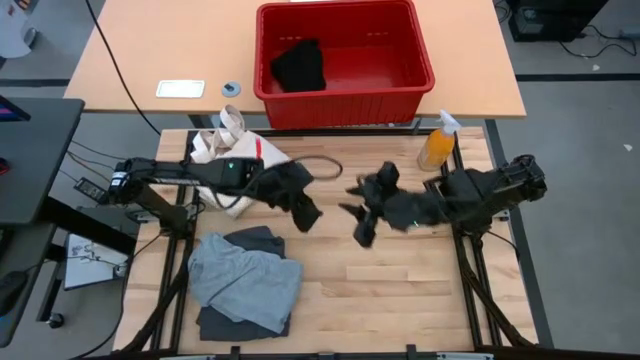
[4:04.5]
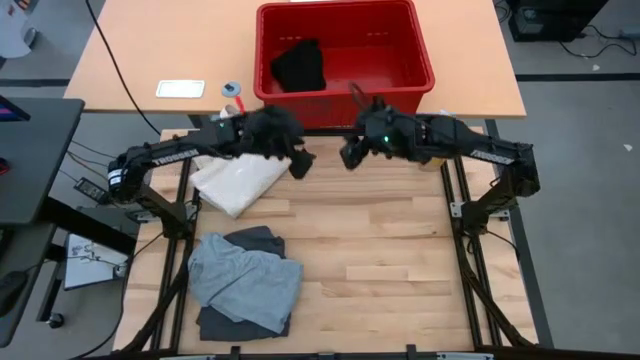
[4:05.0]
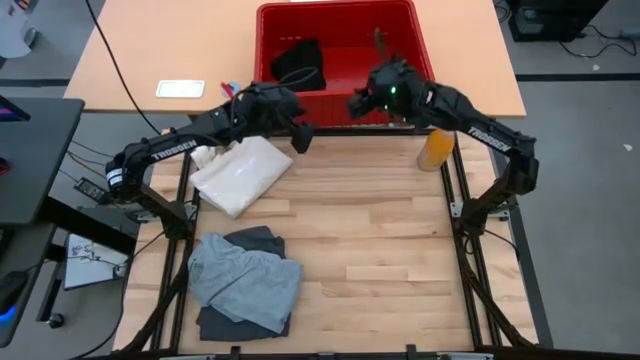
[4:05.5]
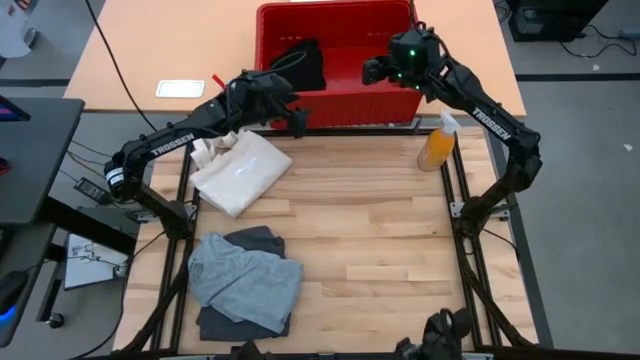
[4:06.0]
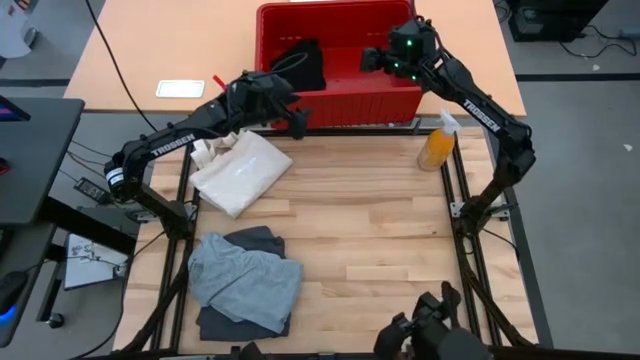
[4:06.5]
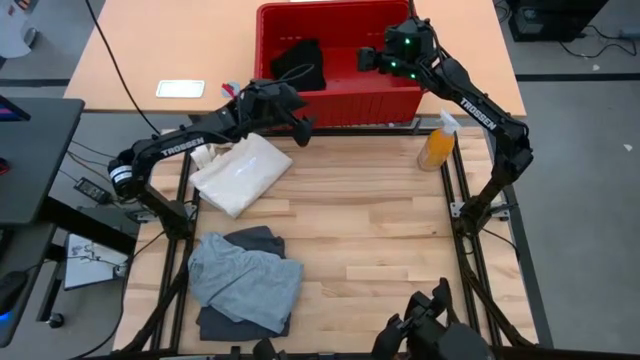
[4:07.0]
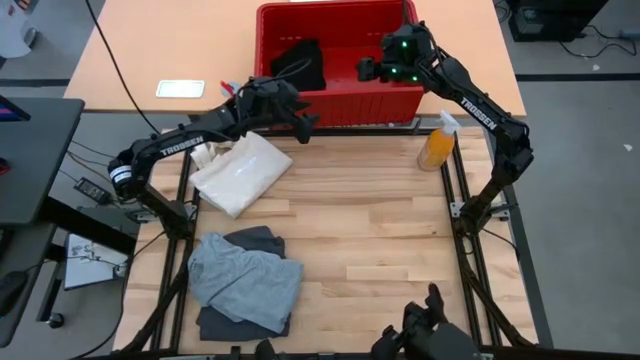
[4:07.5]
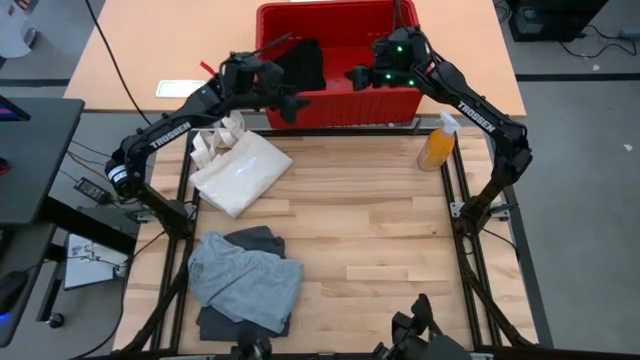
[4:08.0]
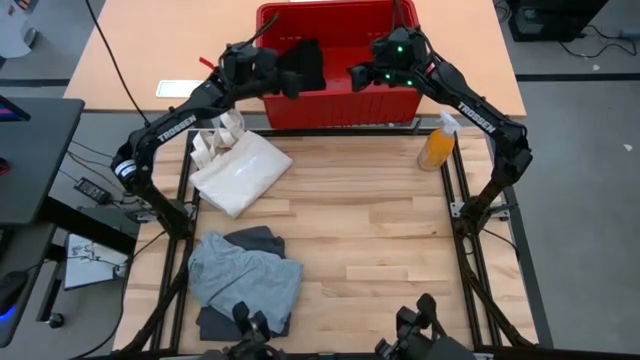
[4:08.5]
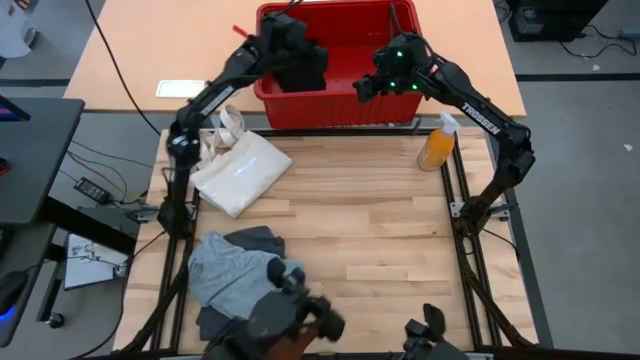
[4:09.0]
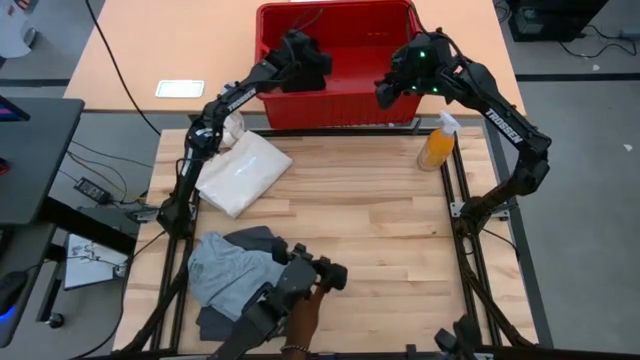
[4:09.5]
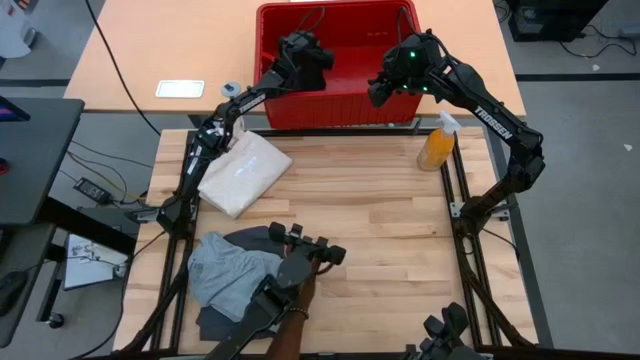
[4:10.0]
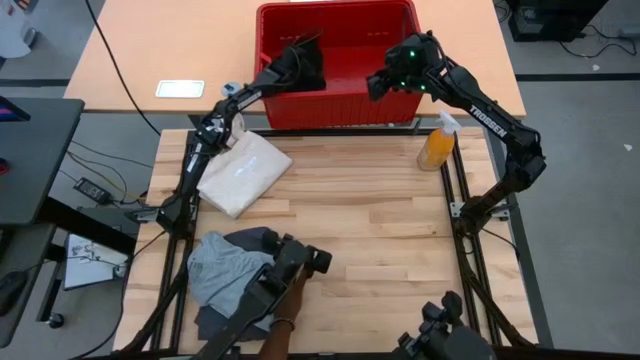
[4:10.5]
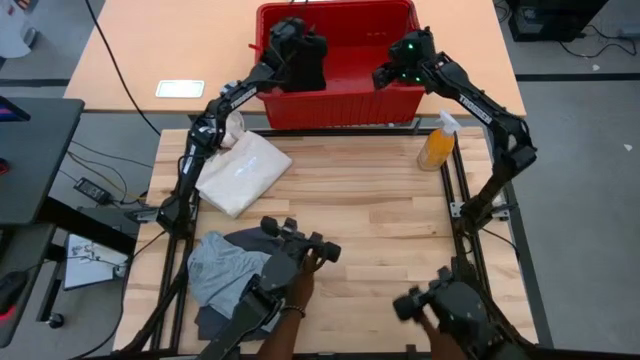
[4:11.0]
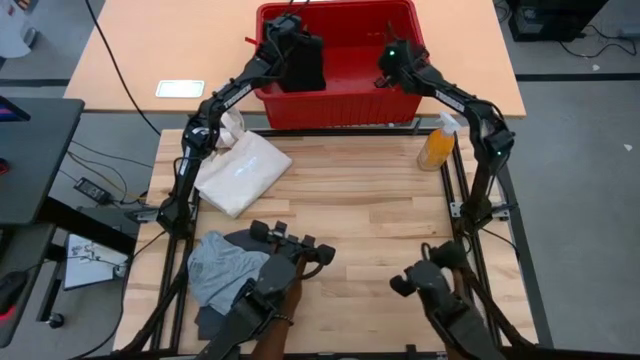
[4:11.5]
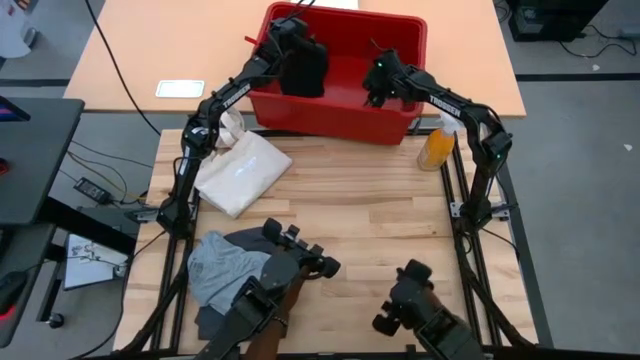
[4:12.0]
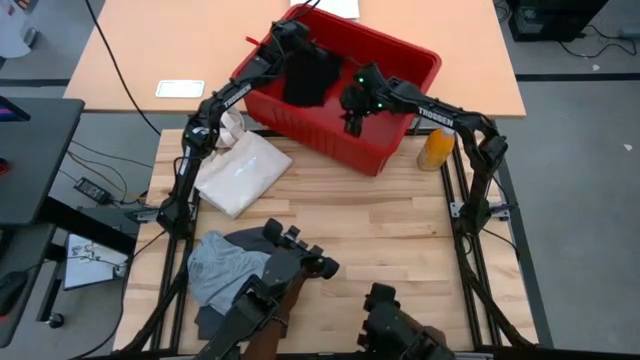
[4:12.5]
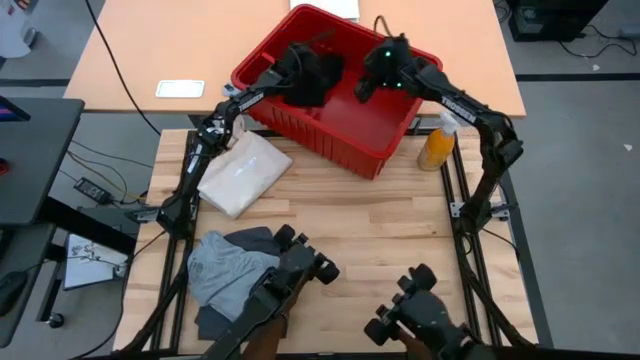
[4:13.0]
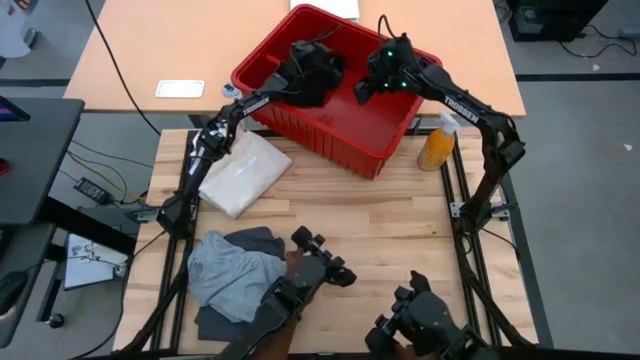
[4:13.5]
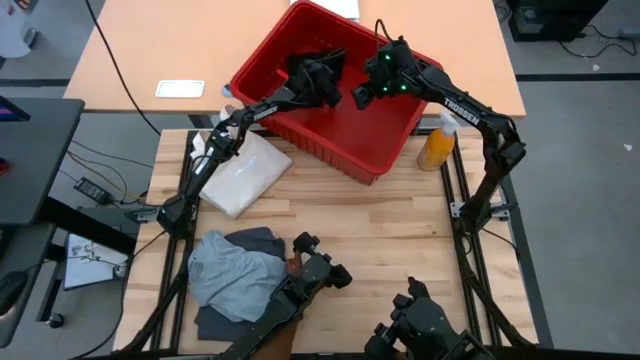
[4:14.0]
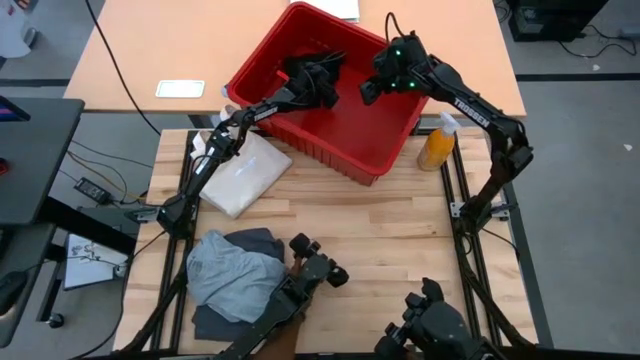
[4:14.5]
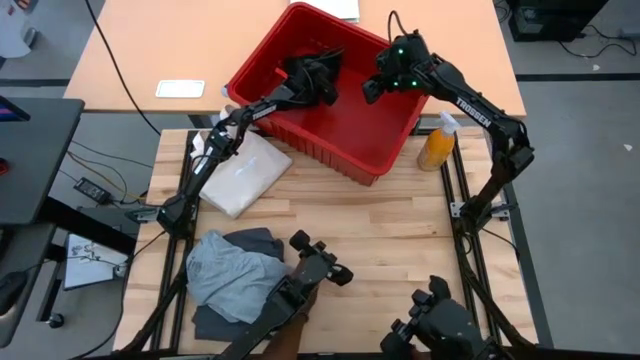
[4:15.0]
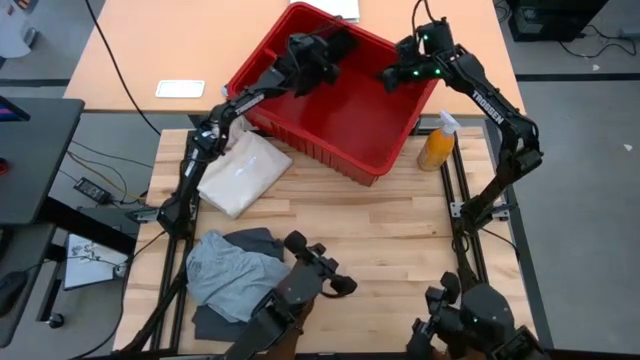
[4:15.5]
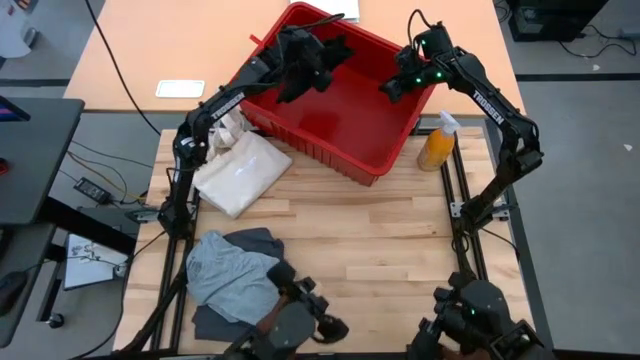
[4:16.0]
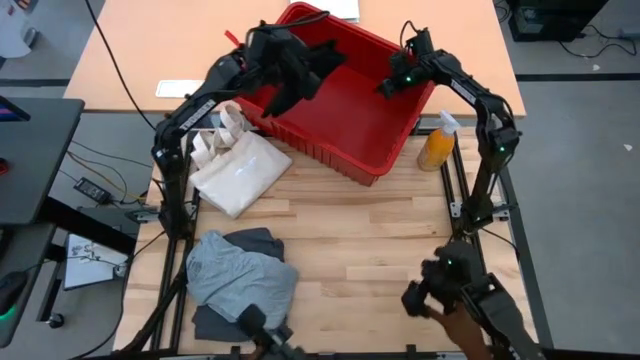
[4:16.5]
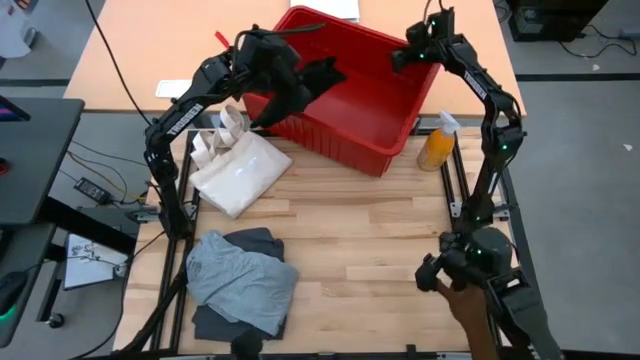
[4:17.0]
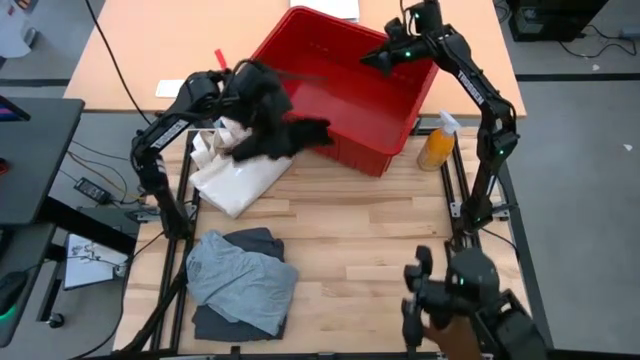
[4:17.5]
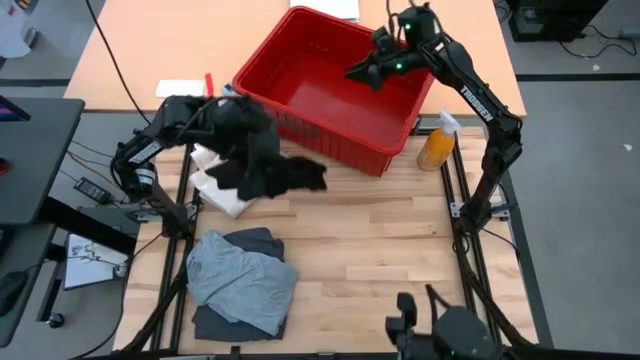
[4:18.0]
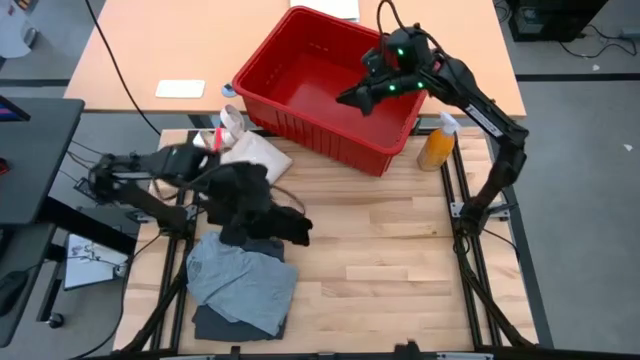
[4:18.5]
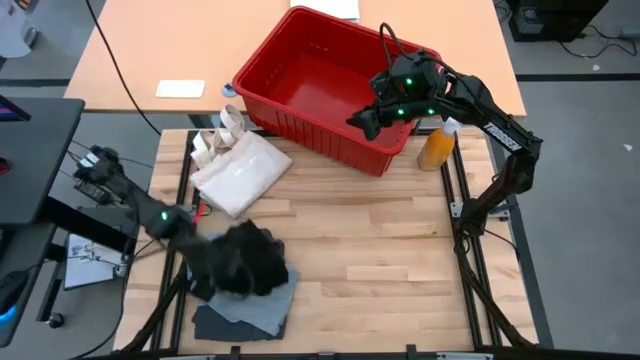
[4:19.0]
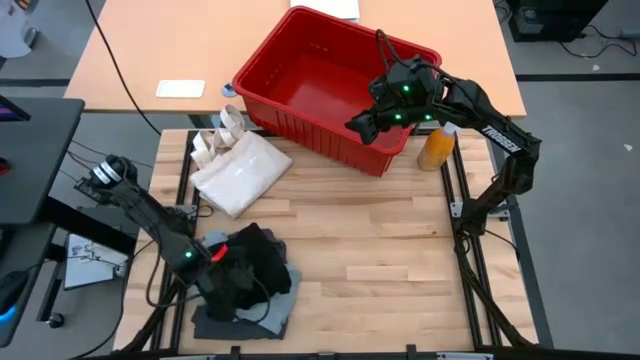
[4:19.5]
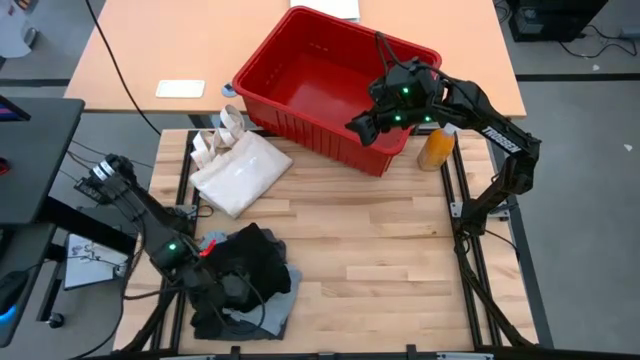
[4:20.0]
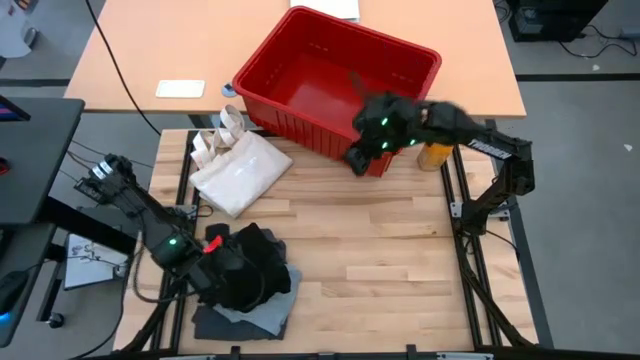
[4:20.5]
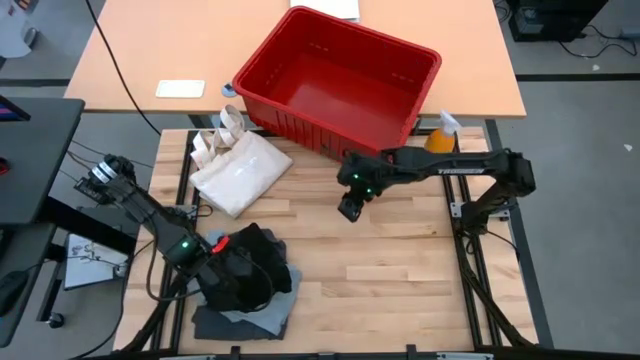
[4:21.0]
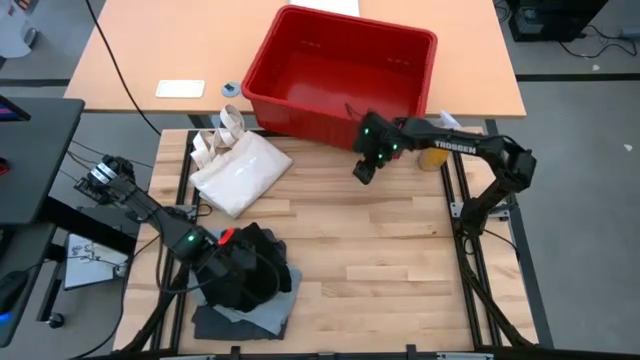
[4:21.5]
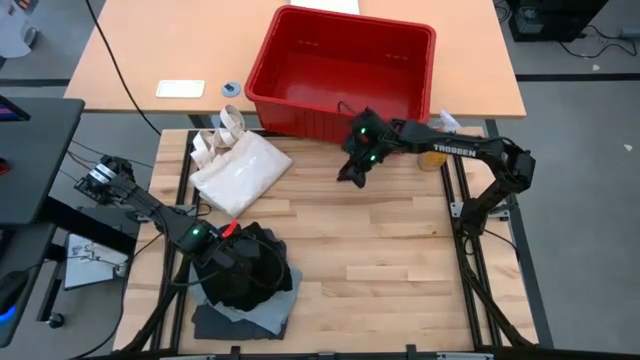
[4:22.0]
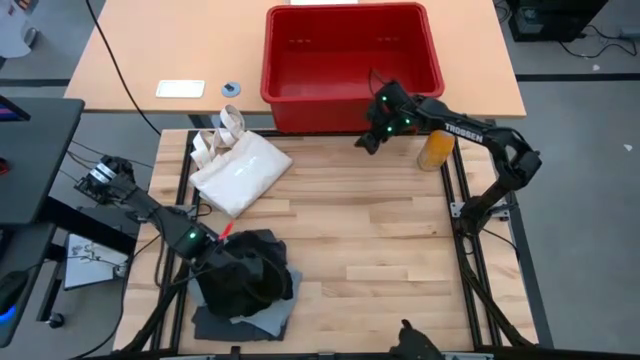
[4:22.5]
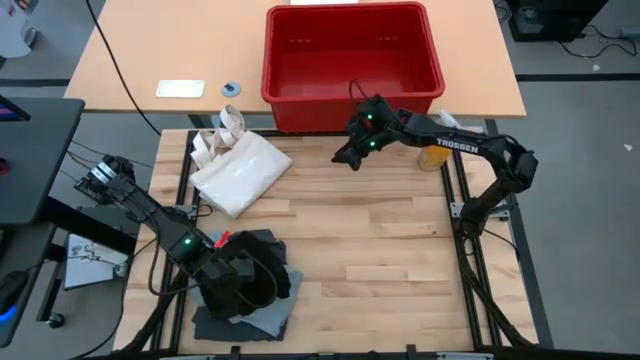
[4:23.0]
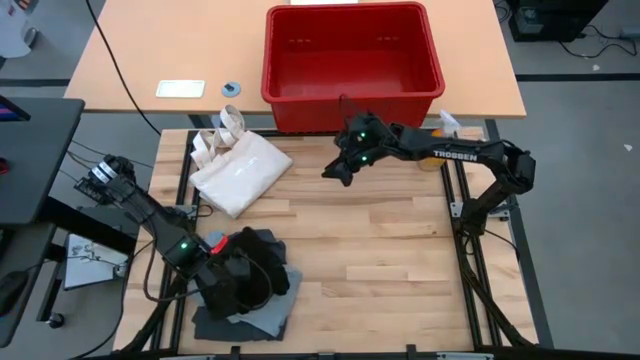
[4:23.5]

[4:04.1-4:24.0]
Task: Fold Laundry from Bin
Remove the black t-shirt from the red organizer bin and put it on the pile of clothes on the table

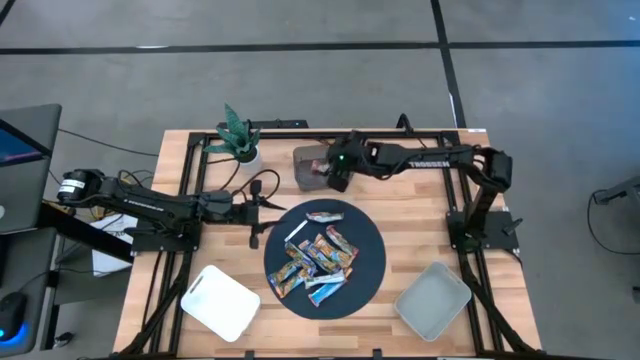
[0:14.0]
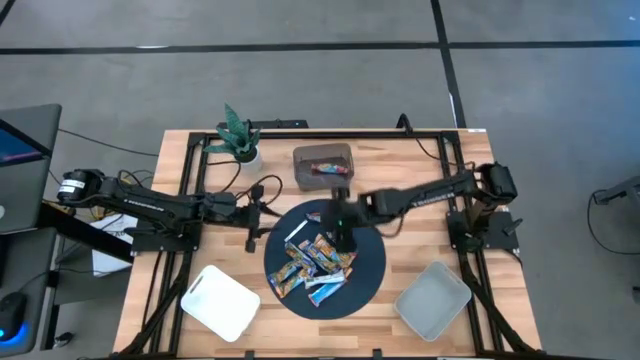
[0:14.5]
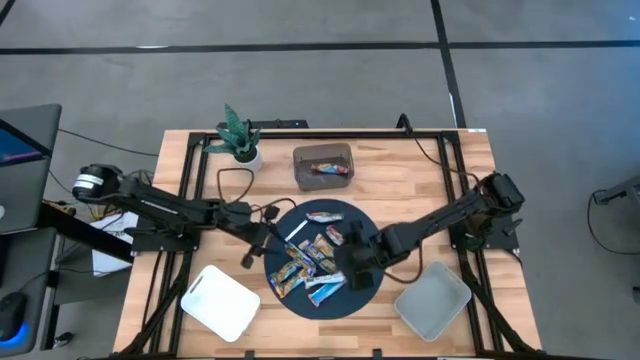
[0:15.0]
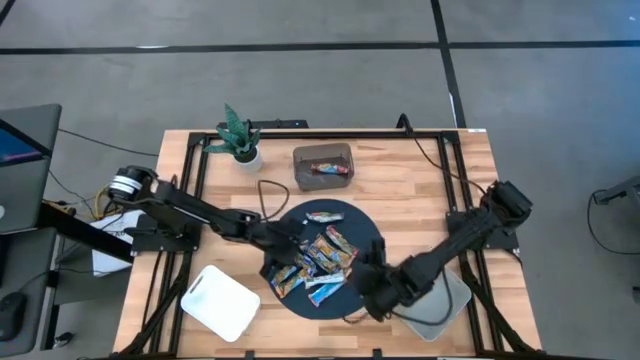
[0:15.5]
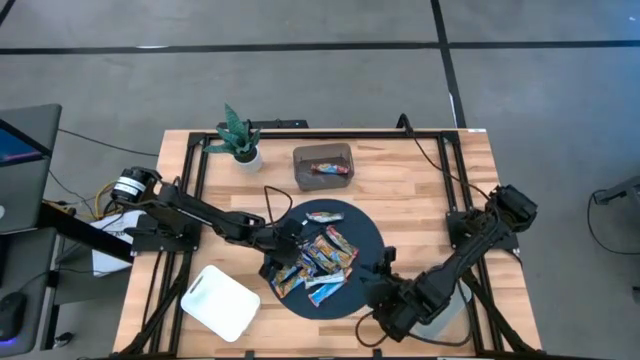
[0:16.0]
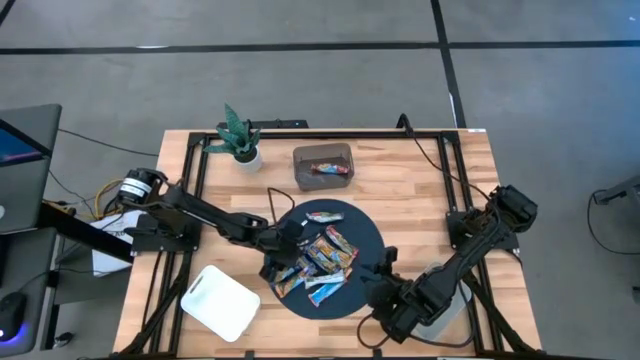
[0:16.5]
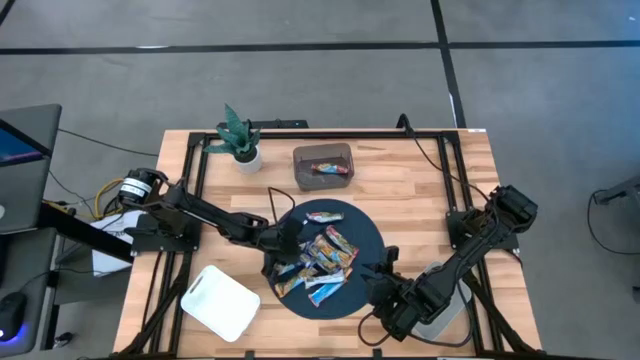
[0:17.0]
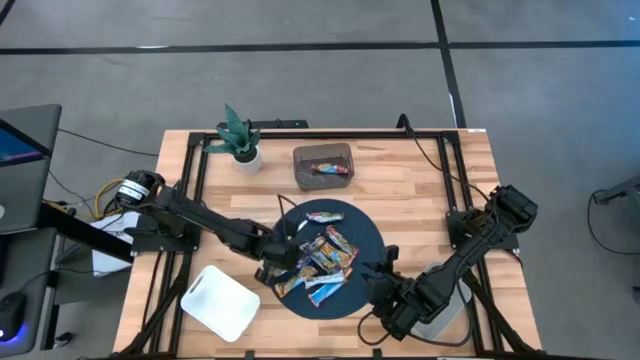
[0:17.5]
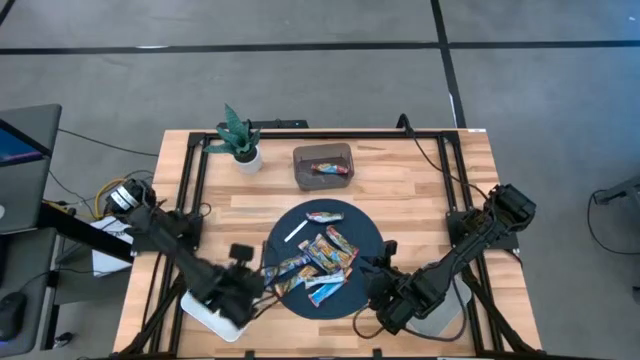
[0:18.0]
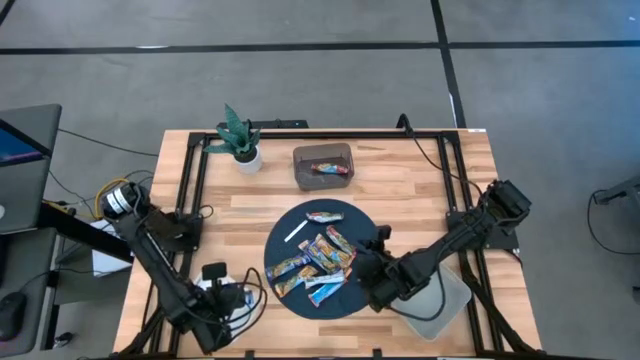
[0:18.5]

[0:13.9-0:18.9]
Task: Pick and place Granola Bars by type
Put the blue granola bar into the white bin
